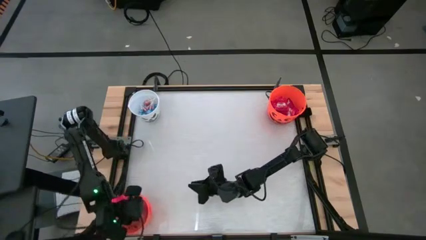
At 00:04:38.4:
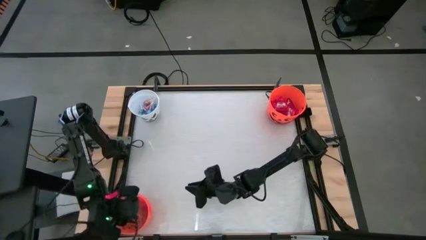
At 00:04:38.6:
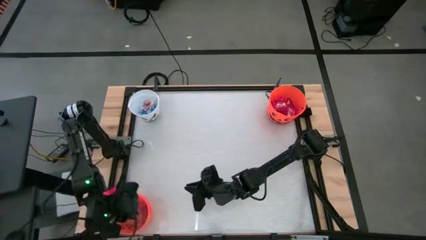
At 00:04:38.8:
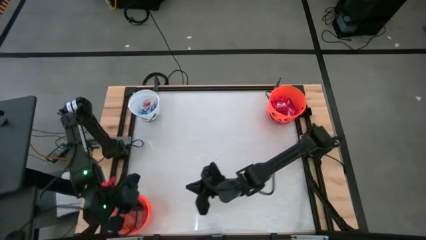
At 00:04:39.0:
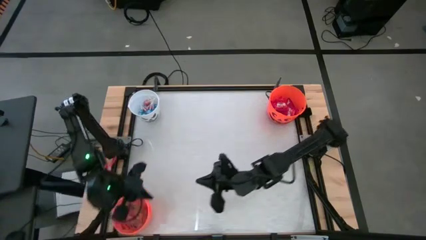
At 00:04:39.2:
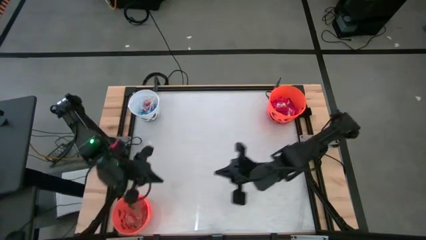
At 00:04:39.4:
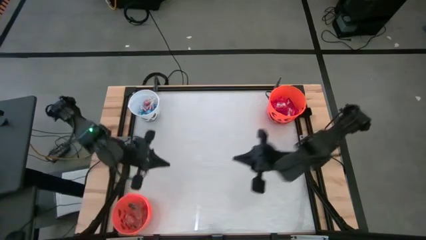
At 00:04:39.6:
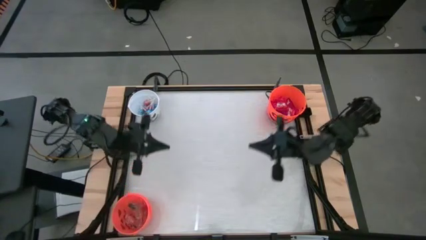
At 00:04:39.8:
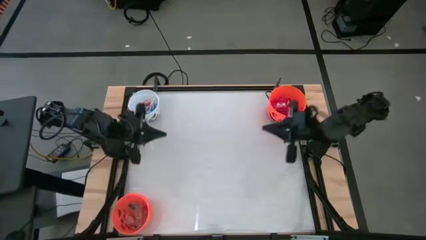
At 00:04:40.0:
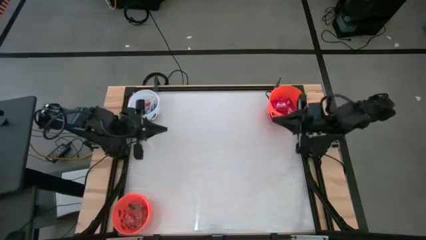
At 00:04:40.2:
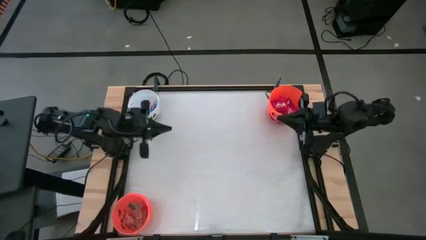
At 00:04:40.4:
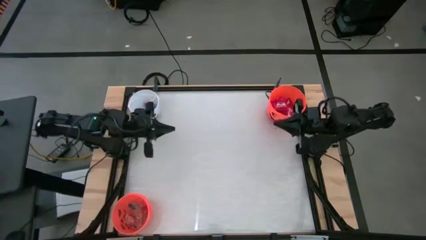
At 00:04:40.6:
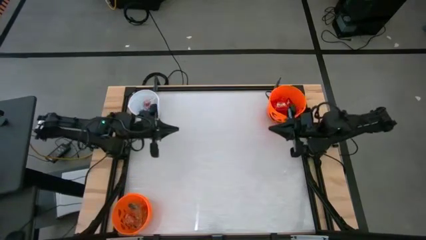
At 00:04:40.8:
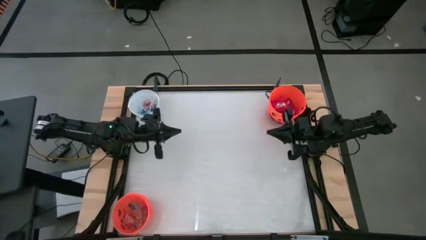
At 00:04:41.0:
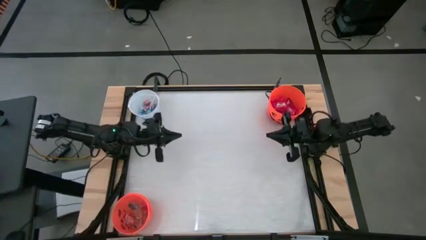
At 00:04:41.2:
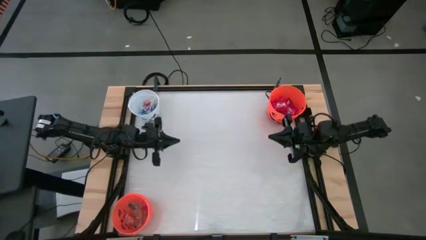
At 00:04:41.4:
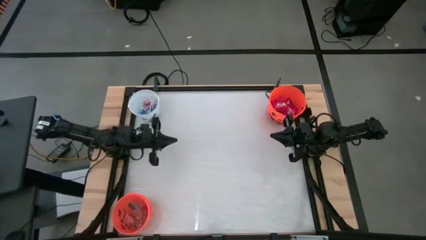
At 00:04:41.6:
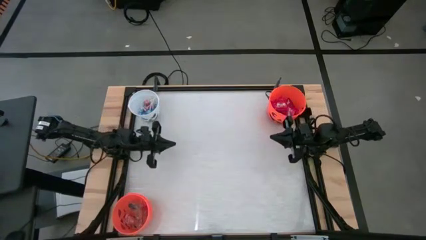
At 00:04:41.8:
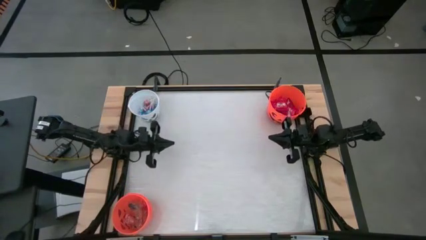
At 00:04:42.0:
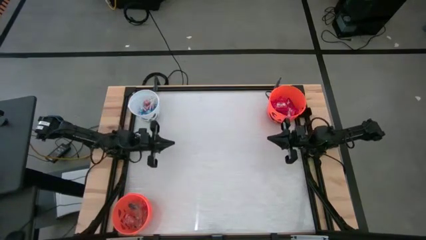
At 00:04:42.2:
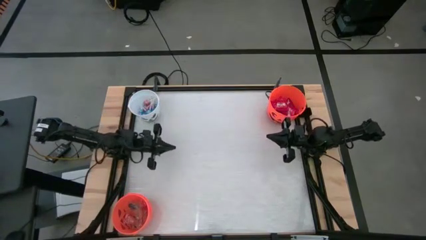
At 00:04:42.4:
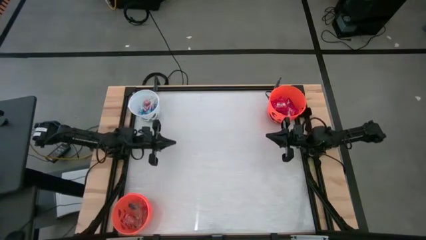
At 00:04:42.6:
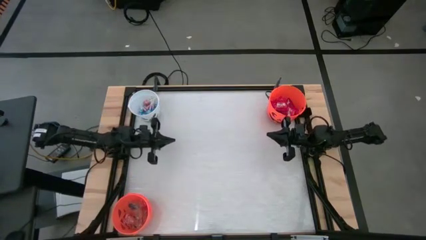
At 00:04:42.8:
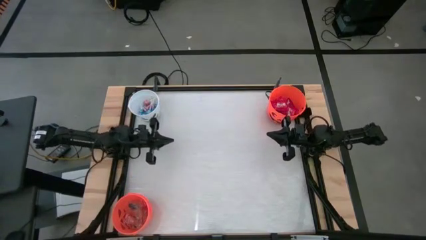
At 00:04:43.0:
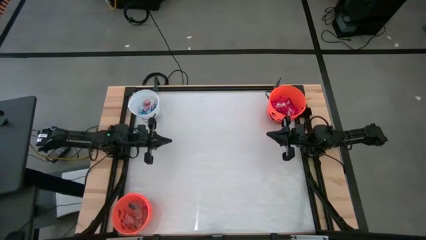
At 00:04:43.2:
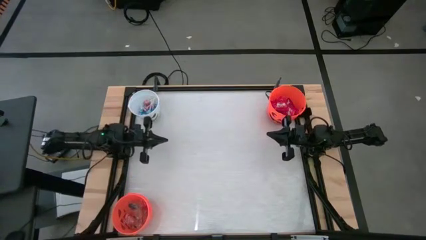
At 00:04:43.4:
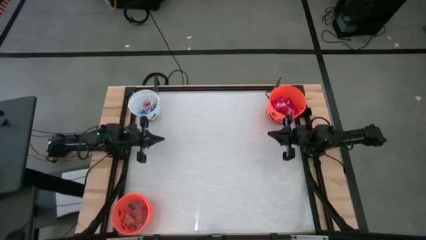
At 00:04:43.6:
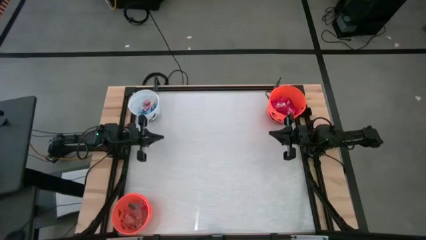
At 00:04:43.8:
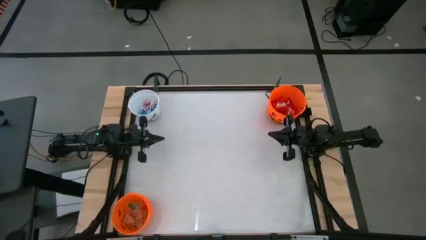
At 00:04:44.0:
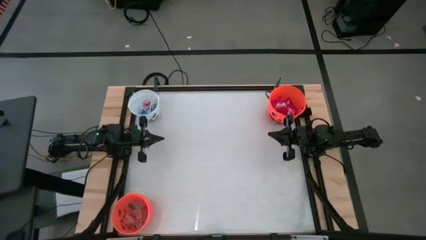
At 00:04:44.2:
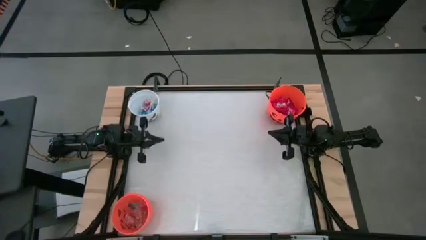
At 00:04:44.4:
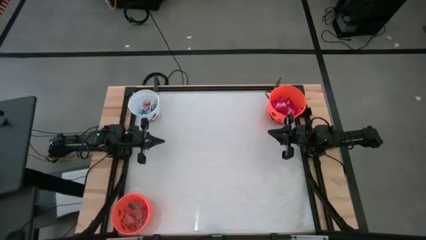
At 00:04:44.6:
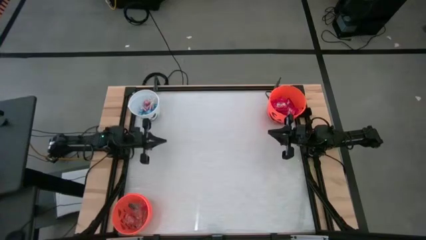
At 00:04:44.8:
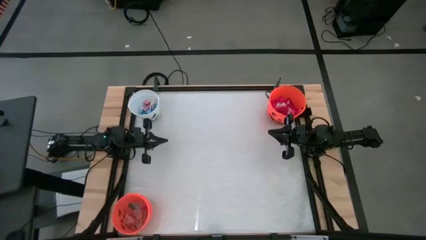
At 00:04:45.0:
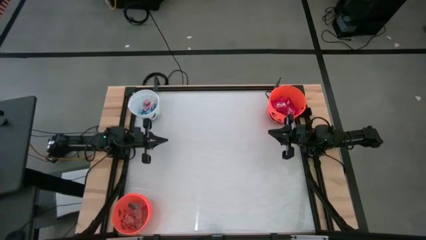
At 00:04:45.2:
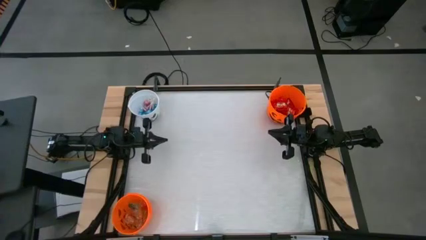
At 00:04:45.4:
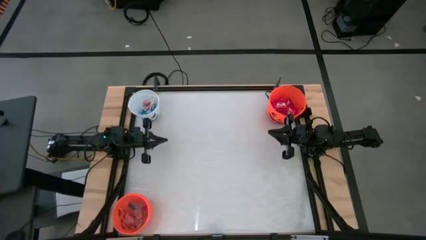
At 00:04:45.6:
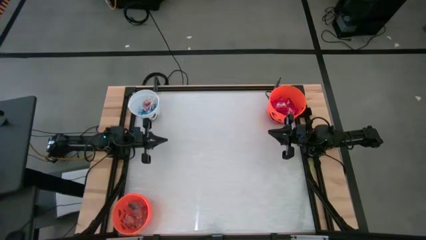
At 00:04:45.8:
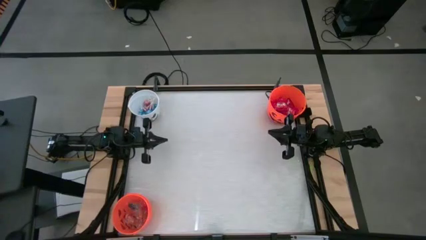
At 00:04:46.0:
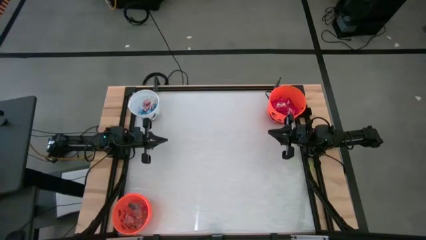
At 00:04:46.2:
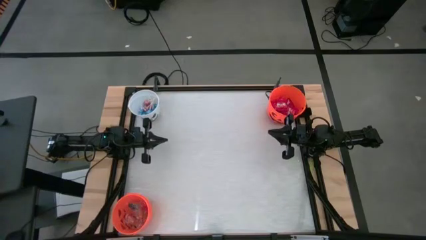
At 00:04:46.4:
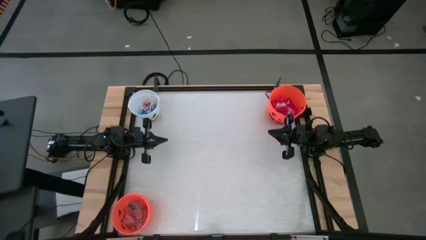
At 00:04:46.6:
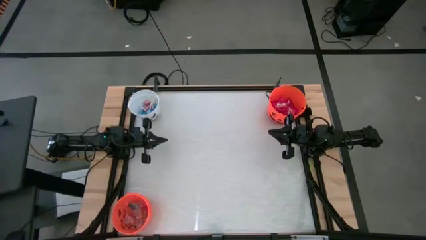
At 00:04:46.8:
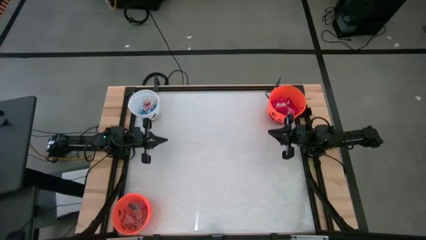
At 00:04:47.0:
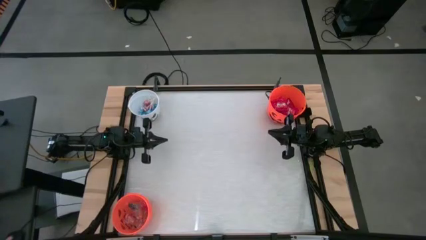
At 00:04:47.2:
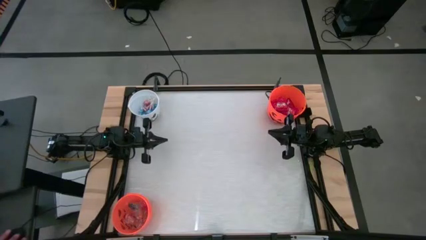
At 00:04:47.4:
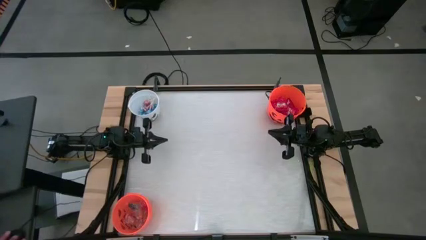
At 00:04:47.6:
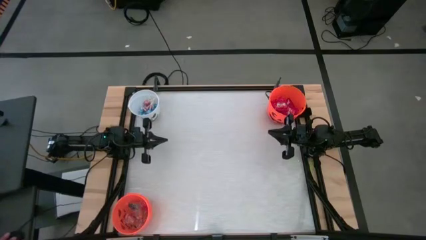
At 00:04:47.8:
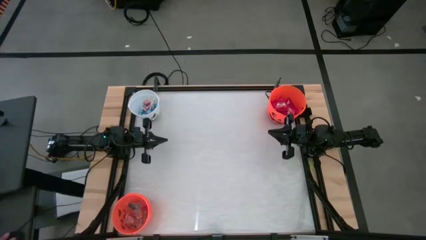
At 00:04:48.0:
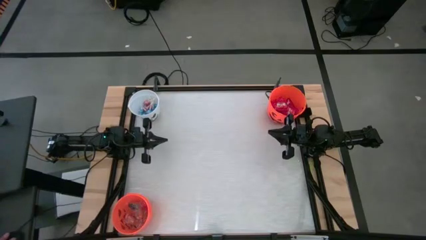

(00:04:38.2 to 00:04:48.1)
Task: Sort candy by brand, put in halloween buckets
Return to Home Position
